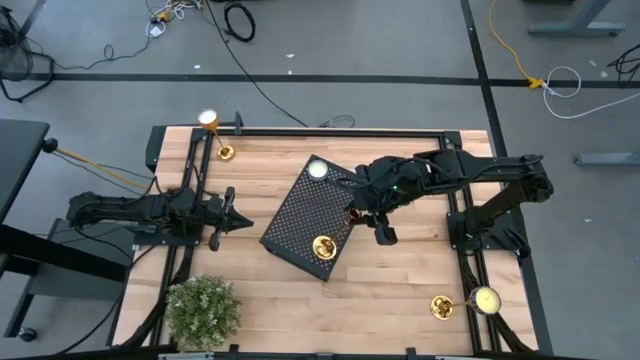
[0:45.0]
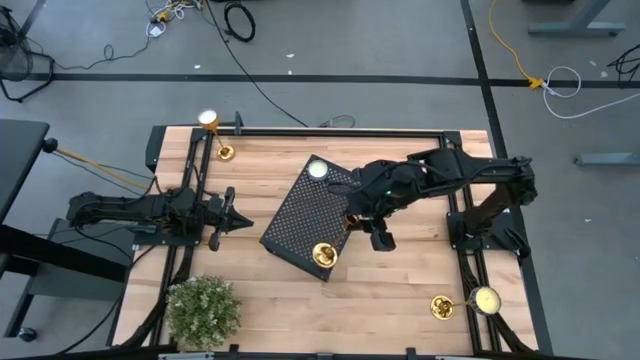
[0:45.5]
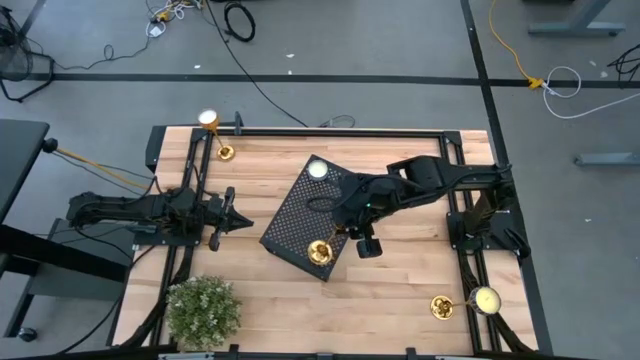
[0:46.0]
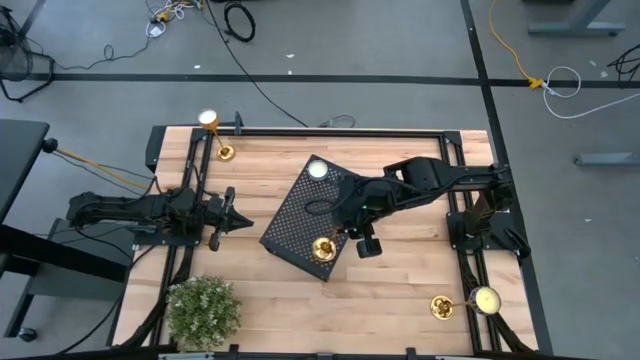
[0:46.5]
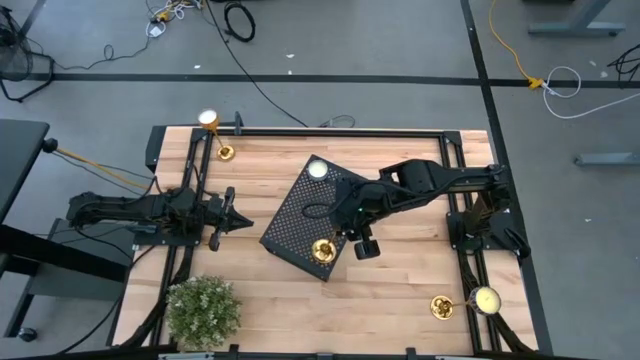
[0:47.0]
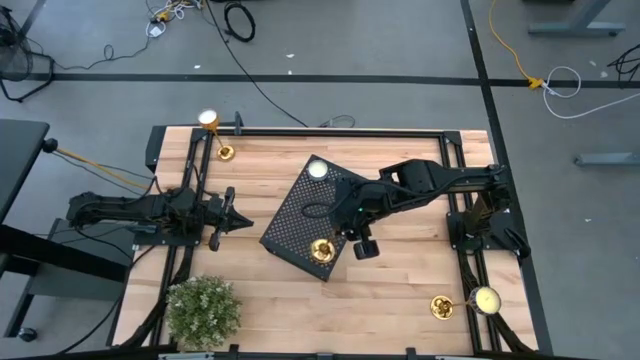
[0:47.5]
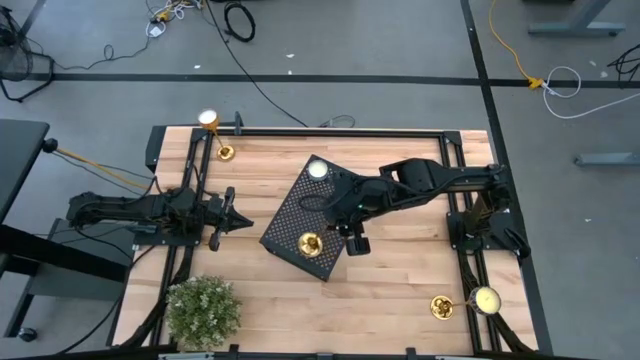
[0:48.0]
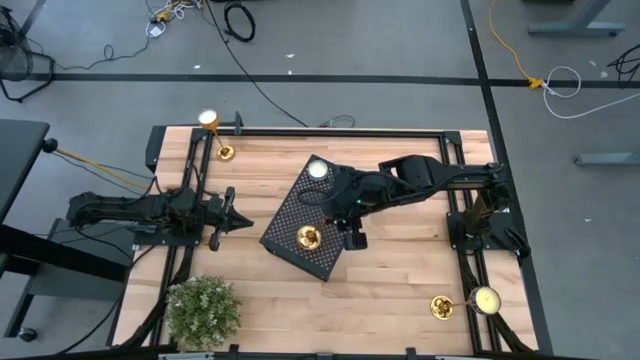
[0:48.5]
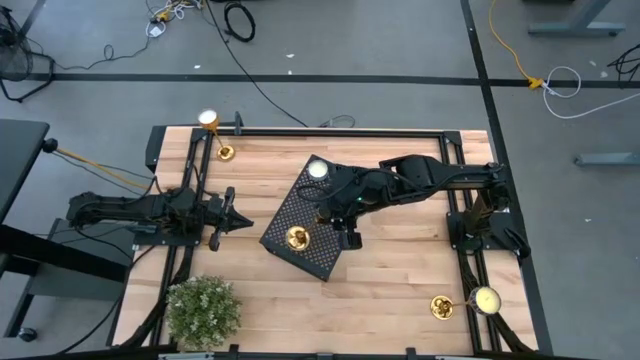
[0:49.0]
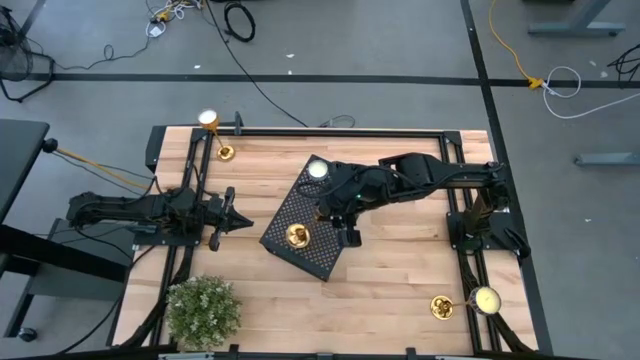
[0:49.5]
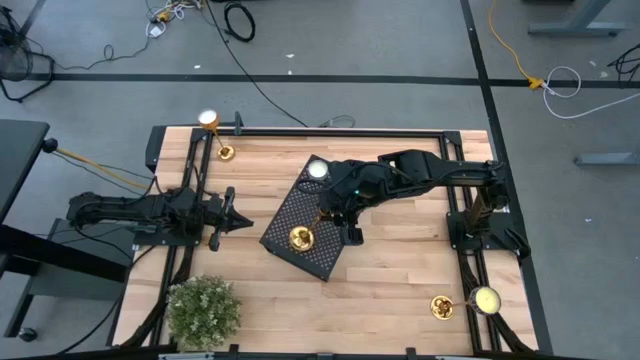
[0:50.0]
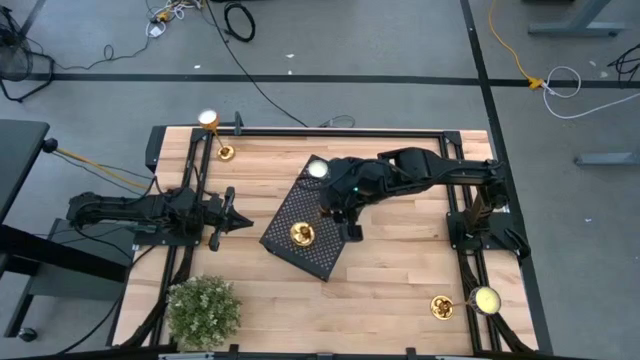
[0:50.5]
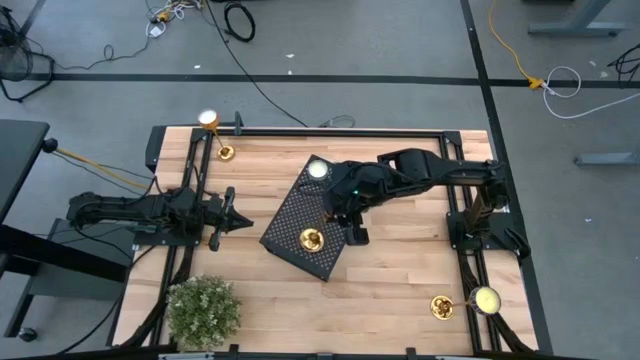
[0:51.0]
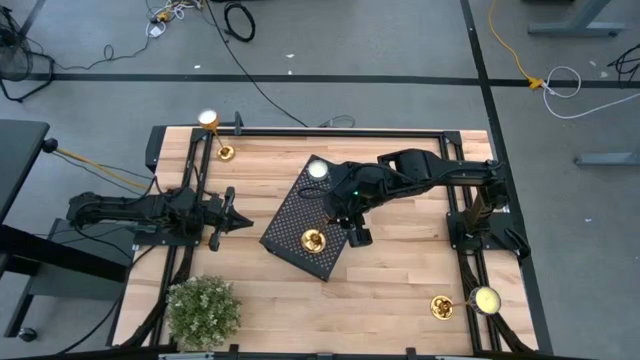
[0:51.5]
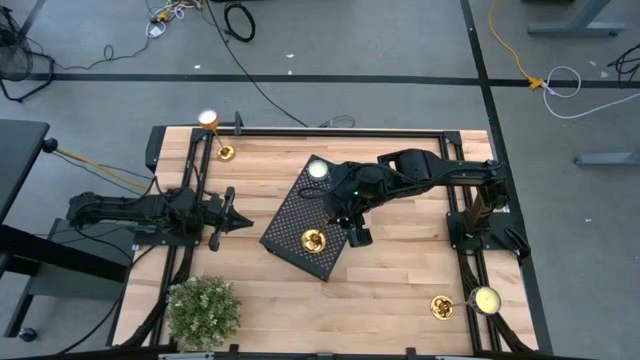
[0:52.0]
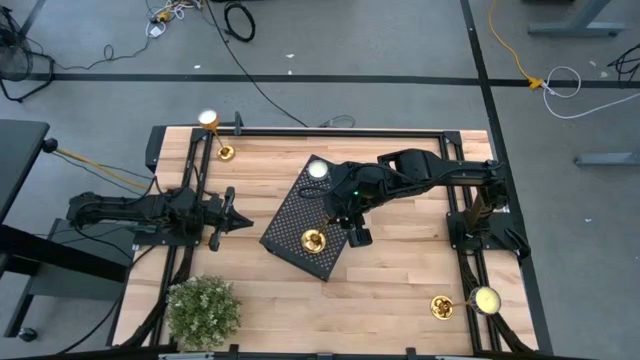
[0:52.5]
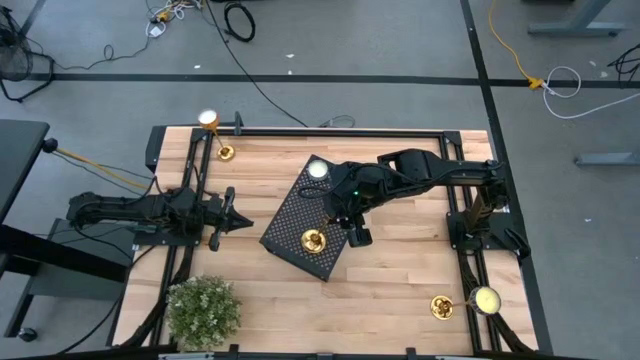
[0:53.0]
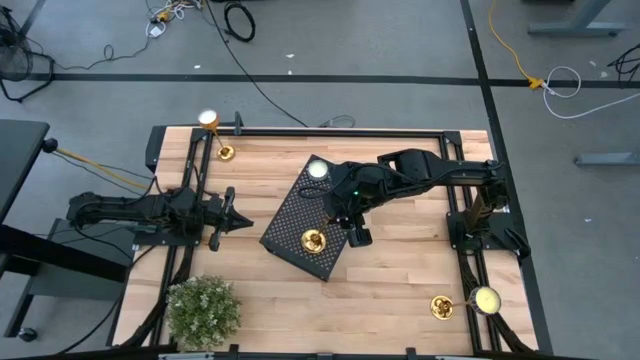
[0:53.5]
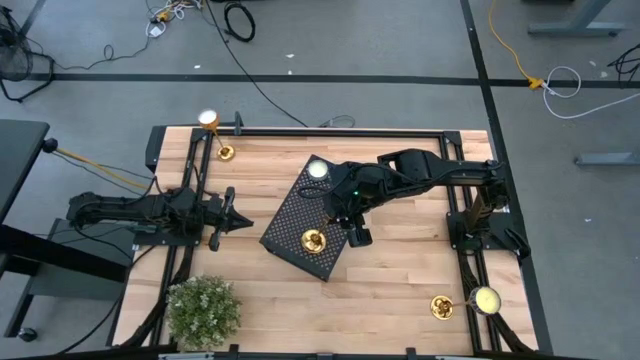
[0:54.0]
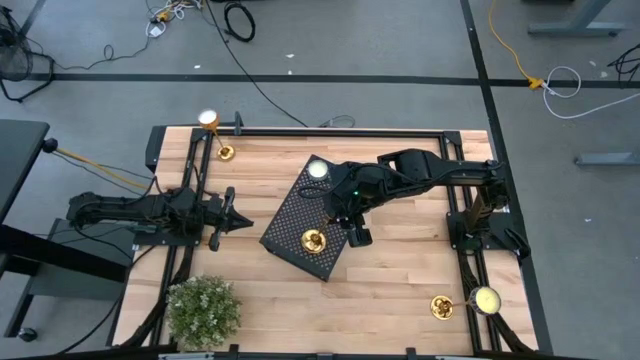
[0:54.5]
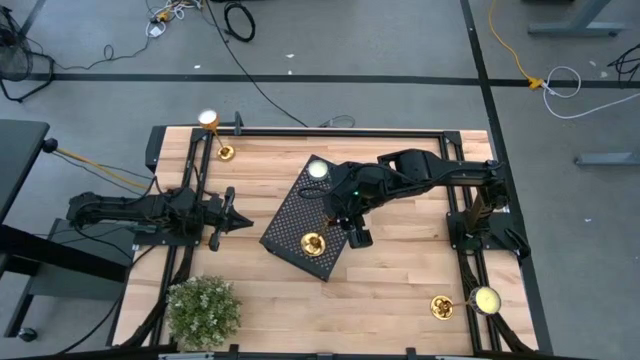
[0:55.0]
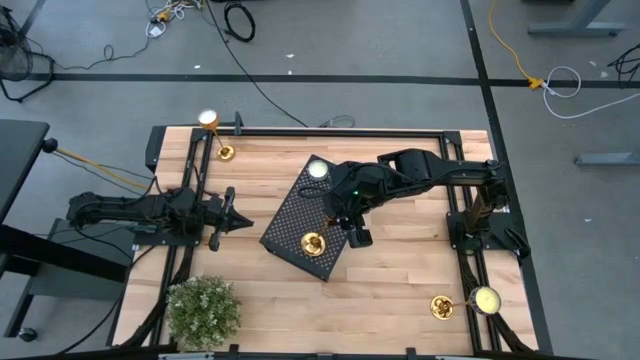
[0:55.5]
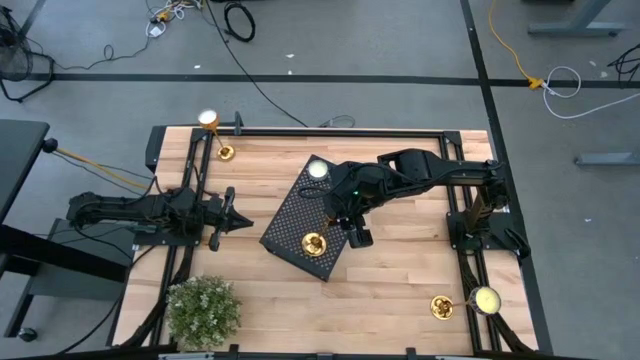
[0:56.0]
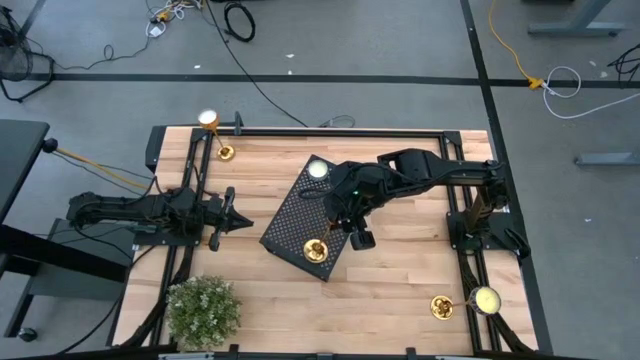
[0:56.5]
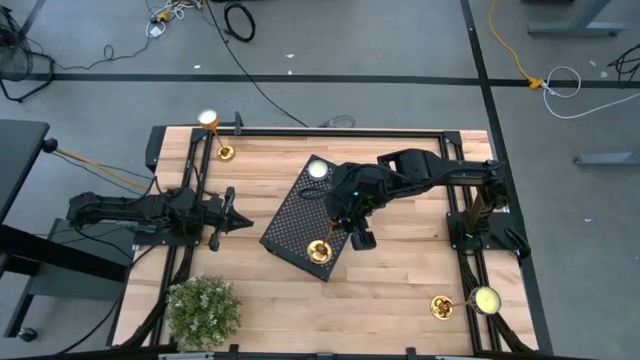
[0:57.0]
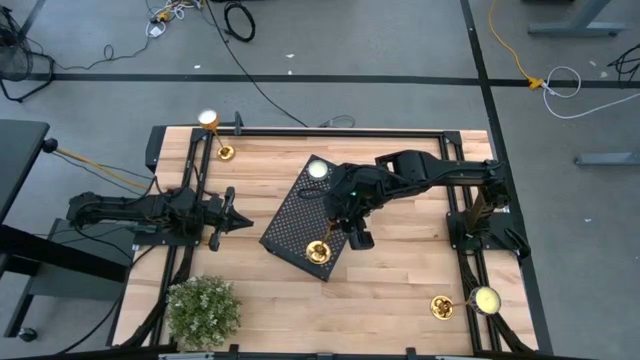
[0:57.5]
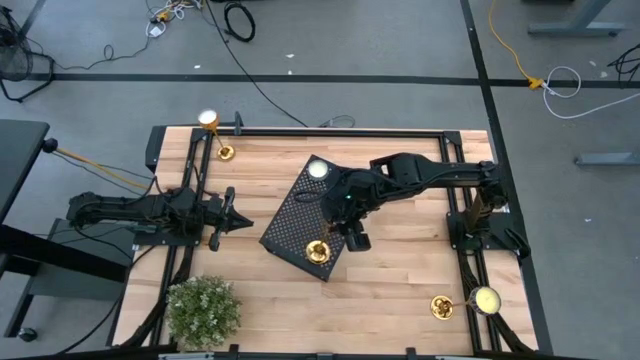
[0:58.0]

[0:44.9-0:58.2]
Task: Stock candles on shelf
Put the top right gold candle holder on the shelf

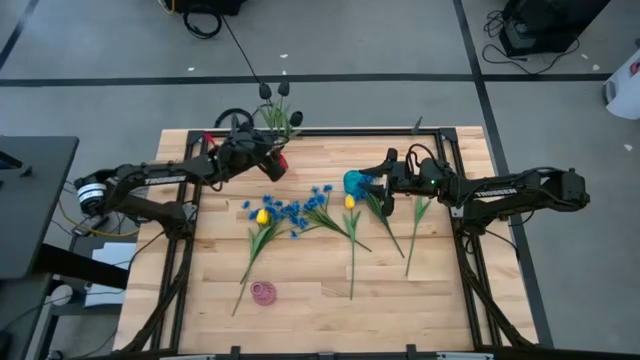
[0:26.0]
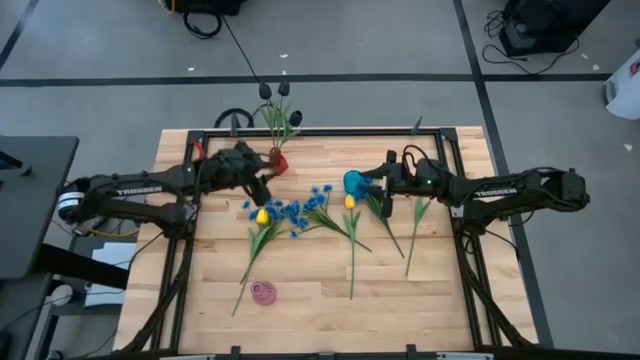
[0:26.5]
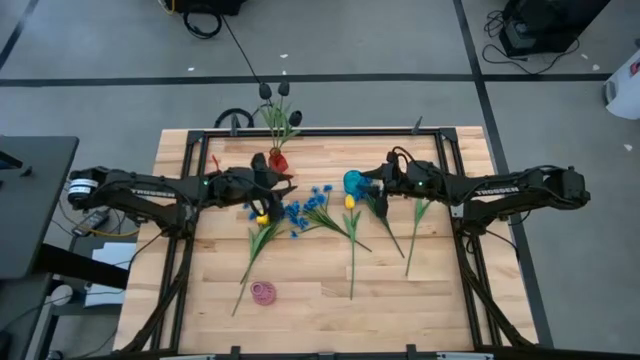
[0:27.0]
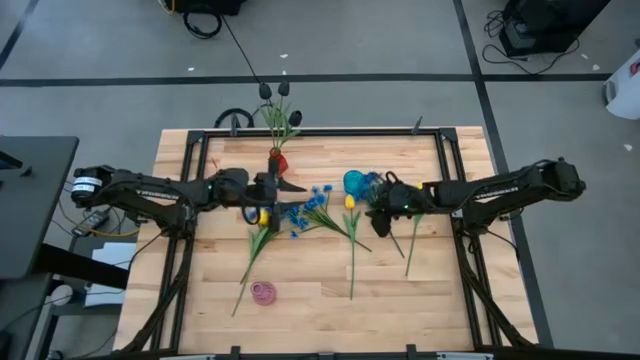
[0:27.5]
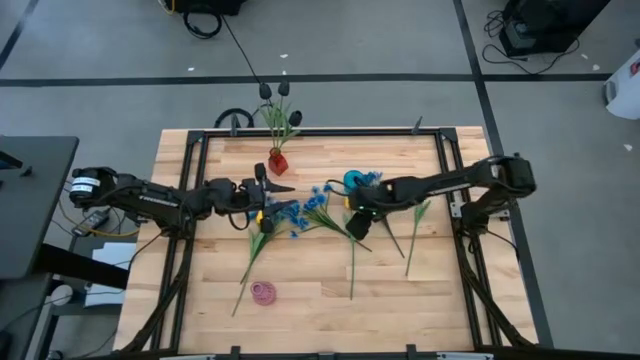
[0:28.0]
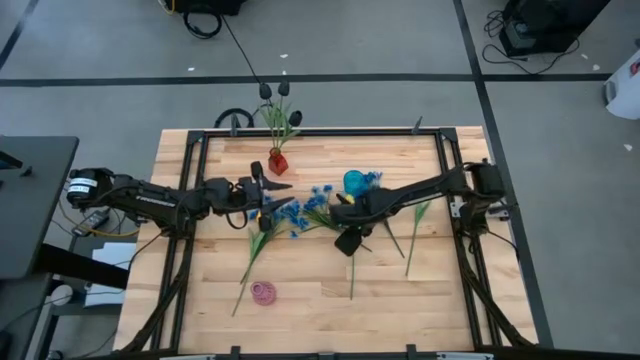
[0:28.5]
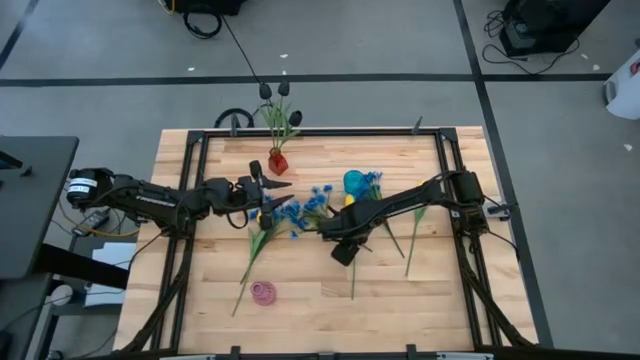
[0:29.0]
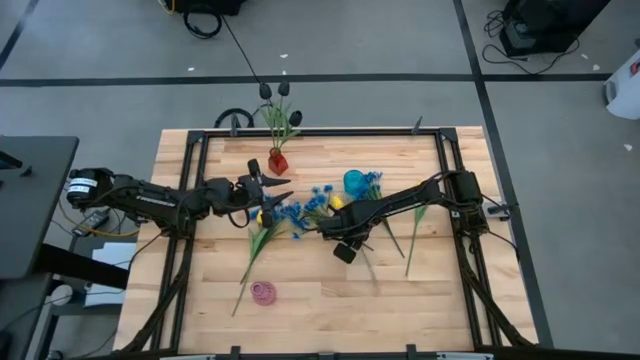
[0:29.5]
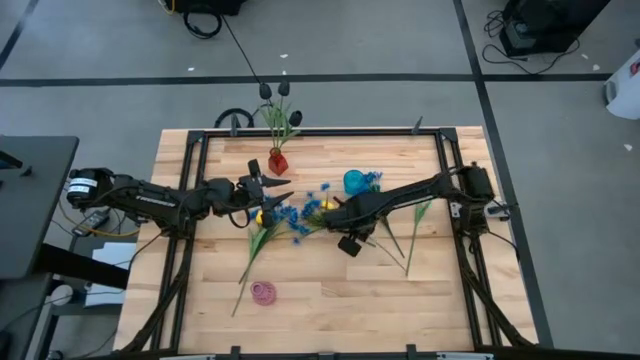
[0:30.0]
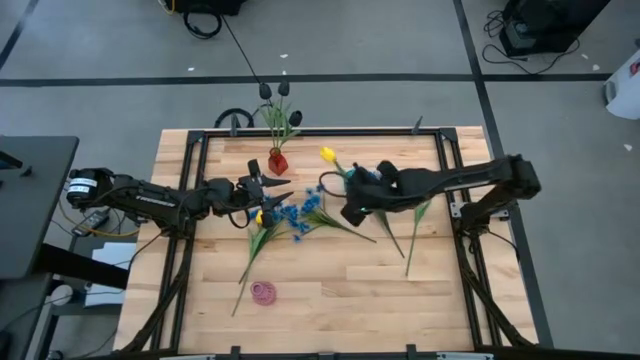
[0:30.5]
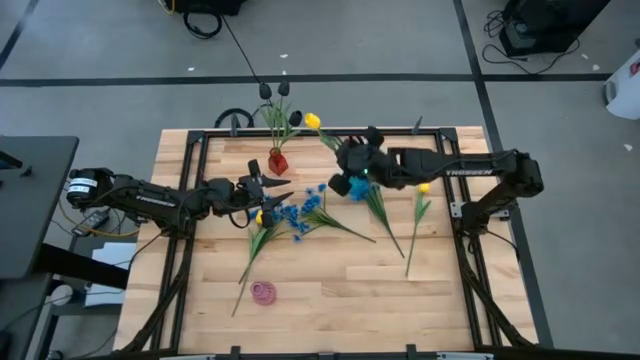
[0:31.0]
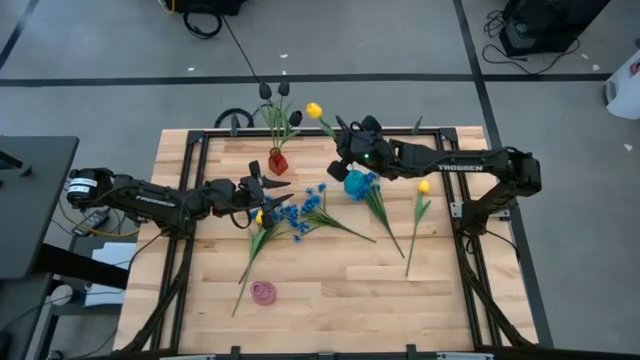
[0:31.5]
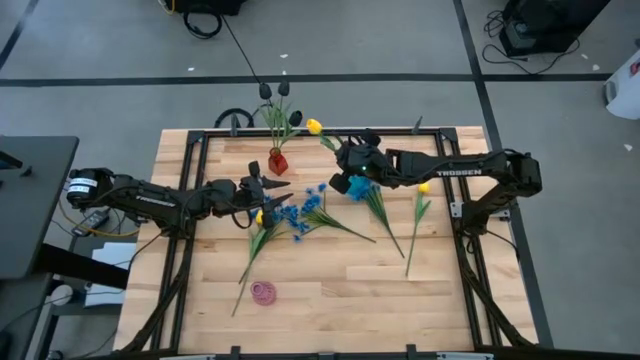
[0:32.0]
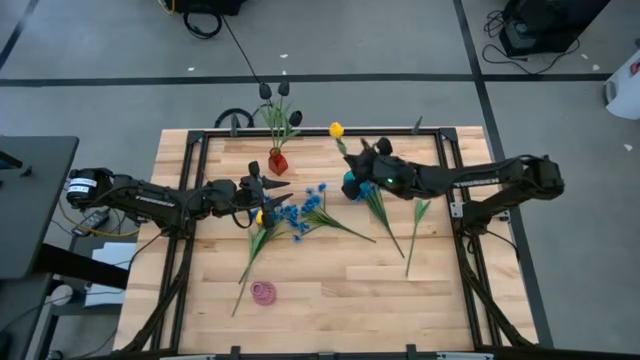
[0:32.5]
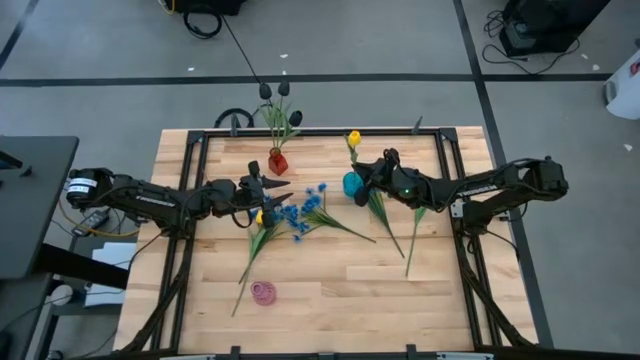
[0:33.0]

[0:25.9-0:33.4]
Task: Sort flowers into vase by color
Put the middle yellow tulip into the blue vase

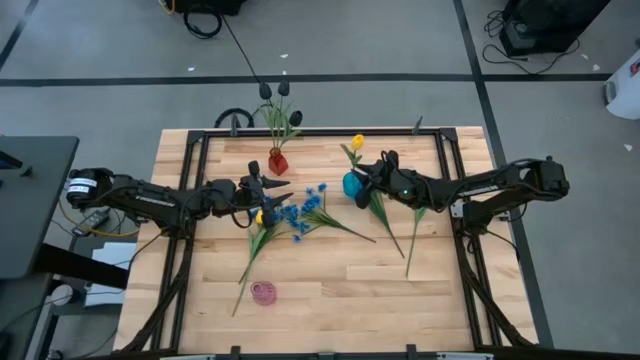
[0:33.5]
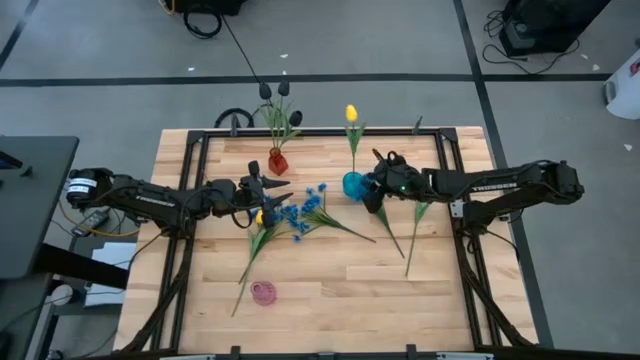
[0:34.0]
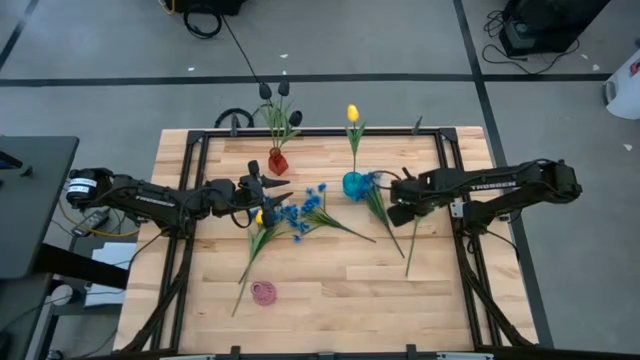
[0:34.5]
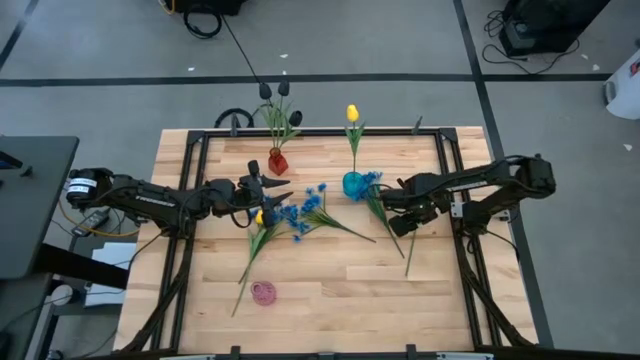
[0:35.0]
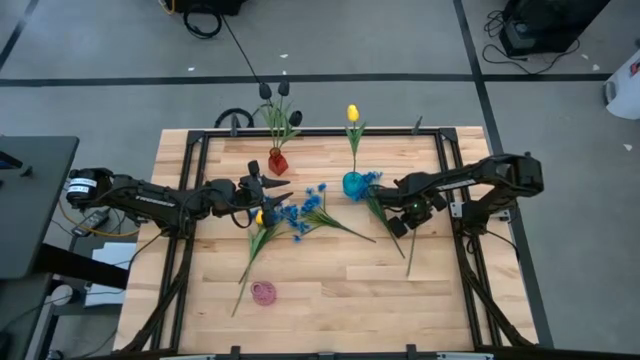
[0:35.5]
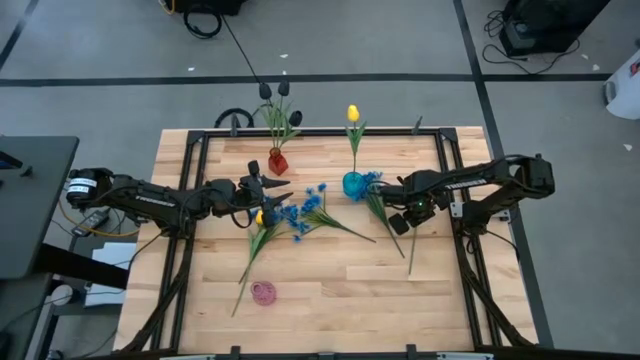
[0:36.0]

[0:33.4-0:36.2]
Put the right yellow tulip into the blue vase
